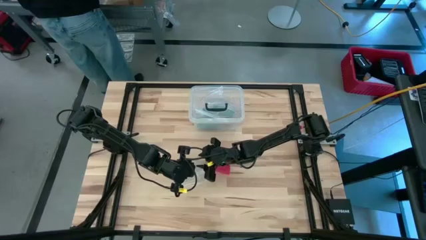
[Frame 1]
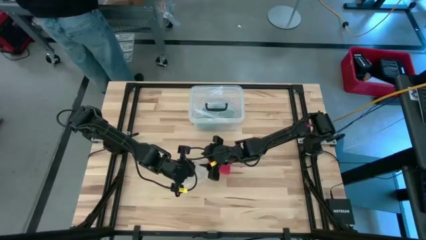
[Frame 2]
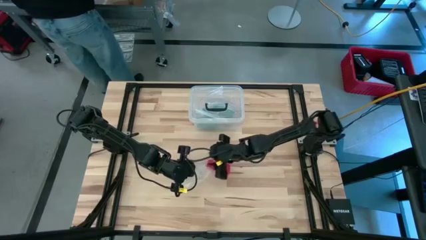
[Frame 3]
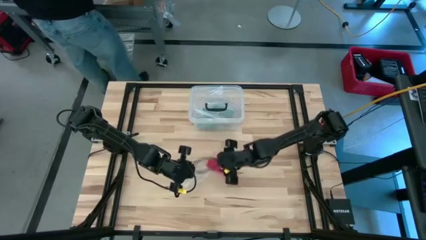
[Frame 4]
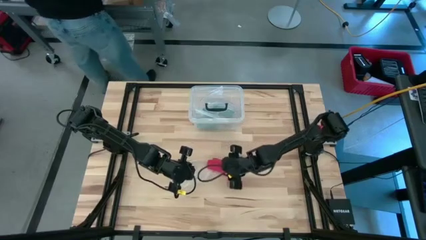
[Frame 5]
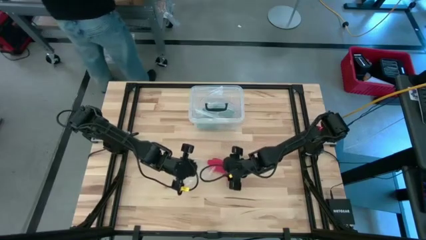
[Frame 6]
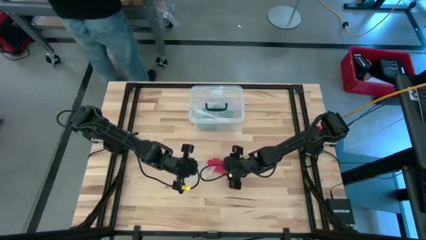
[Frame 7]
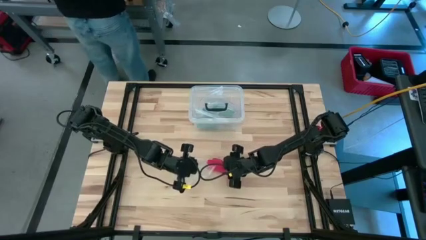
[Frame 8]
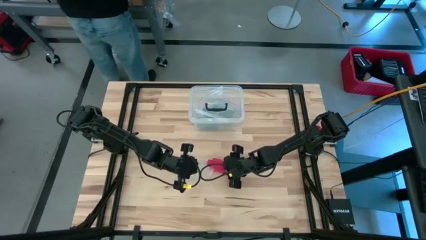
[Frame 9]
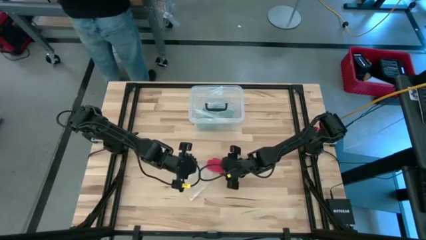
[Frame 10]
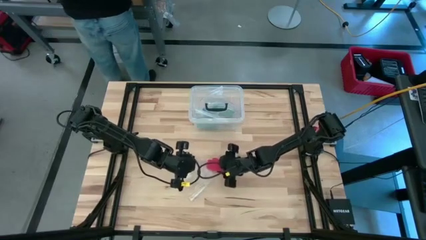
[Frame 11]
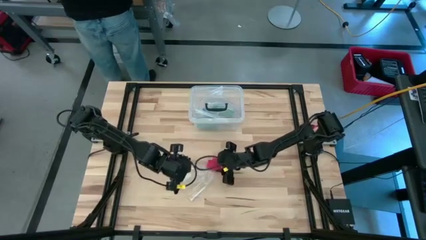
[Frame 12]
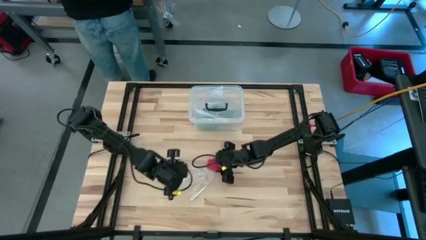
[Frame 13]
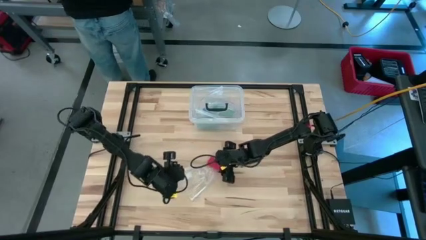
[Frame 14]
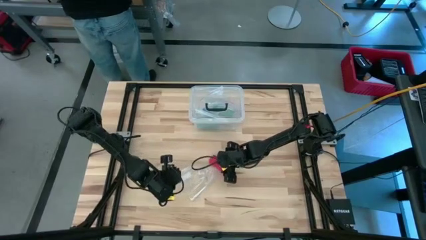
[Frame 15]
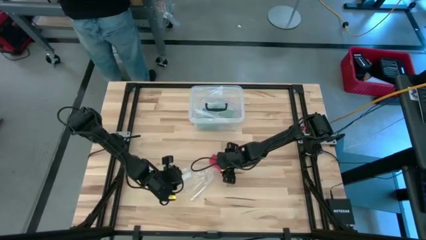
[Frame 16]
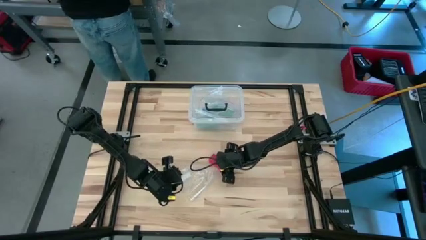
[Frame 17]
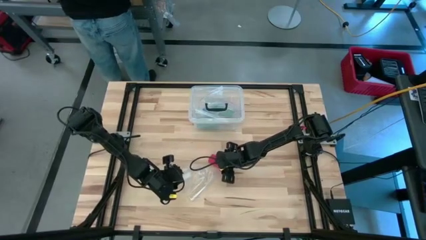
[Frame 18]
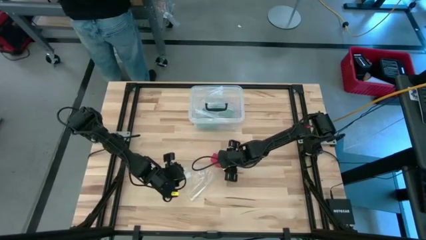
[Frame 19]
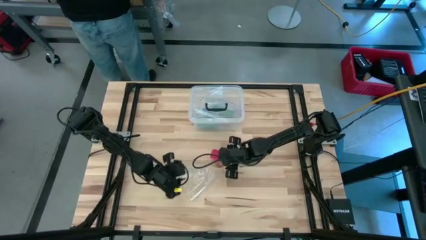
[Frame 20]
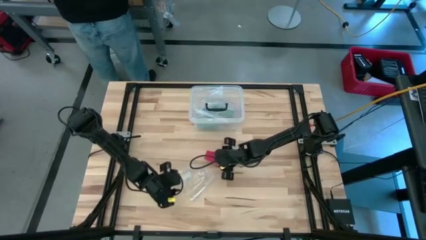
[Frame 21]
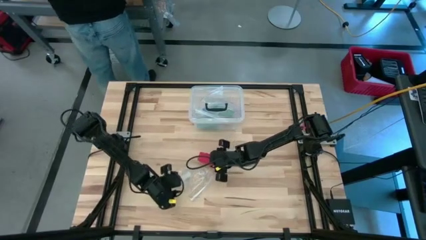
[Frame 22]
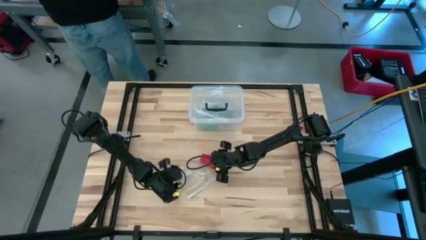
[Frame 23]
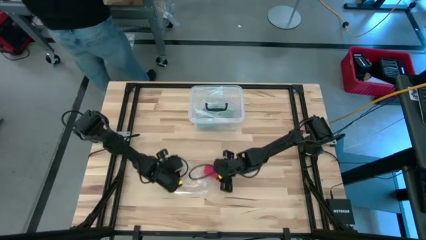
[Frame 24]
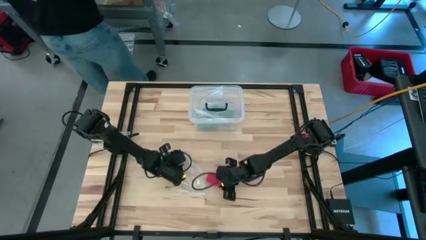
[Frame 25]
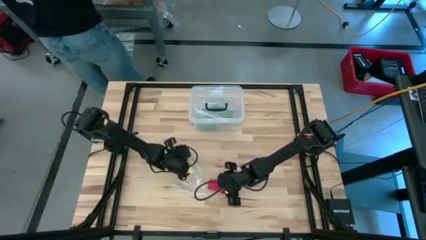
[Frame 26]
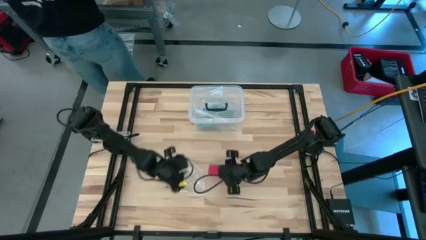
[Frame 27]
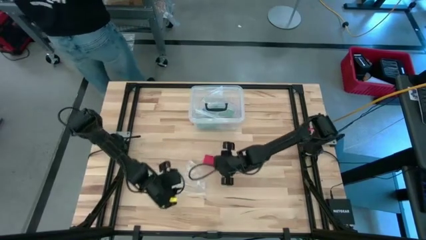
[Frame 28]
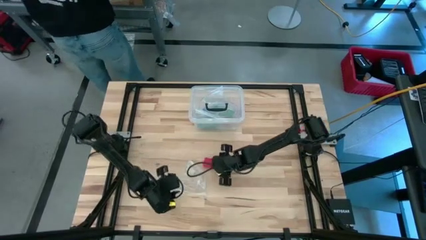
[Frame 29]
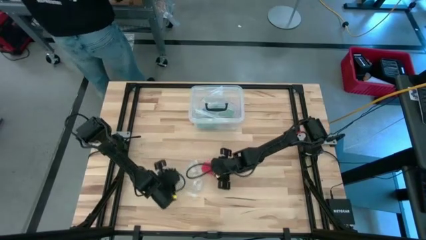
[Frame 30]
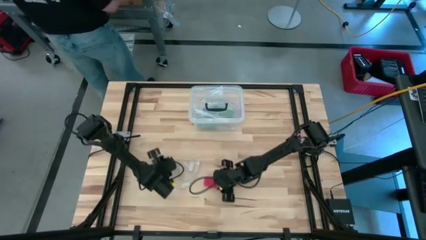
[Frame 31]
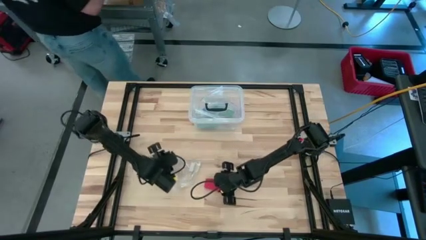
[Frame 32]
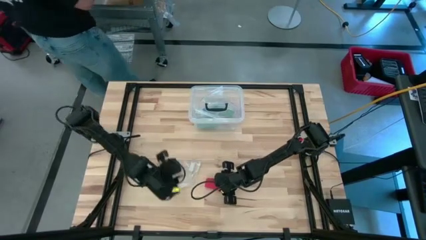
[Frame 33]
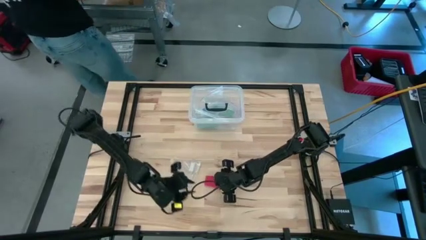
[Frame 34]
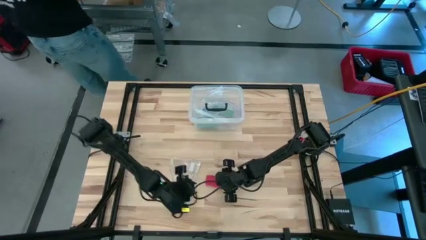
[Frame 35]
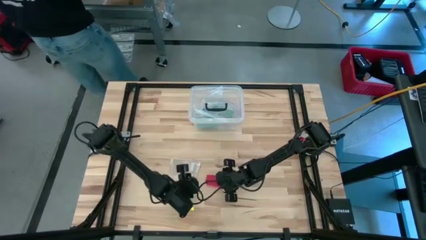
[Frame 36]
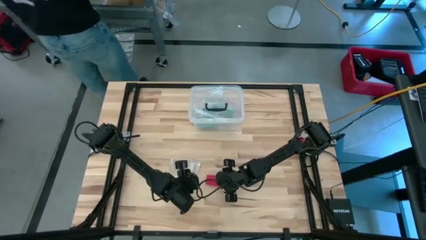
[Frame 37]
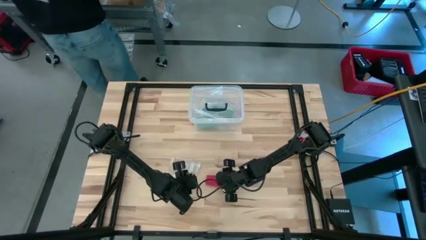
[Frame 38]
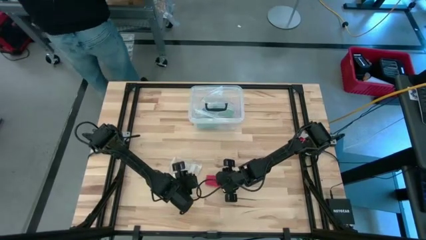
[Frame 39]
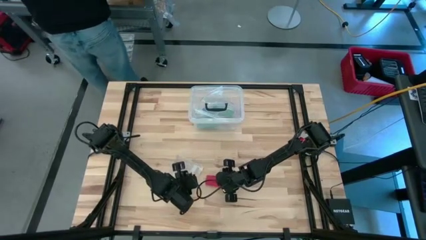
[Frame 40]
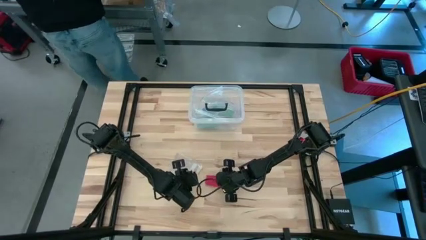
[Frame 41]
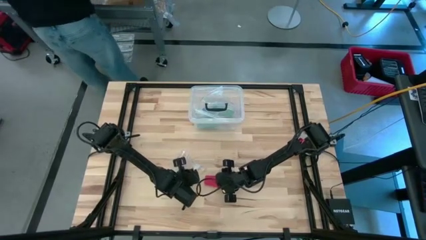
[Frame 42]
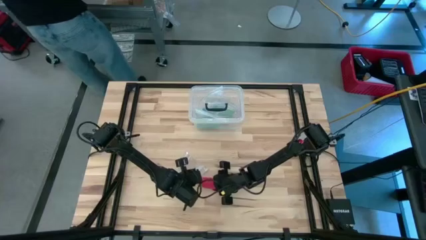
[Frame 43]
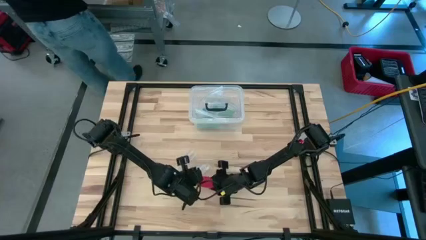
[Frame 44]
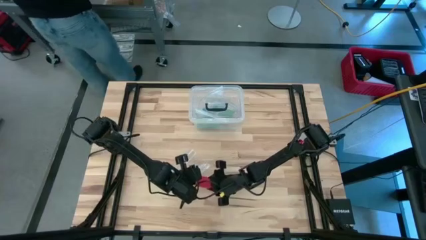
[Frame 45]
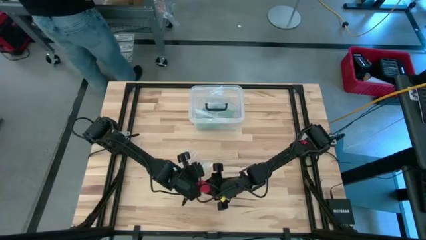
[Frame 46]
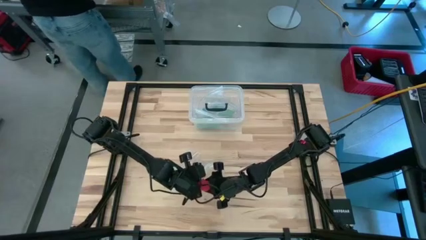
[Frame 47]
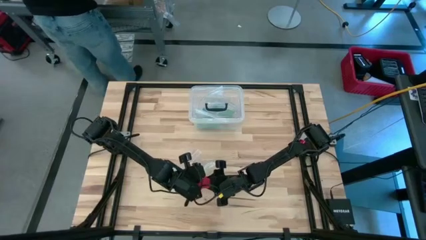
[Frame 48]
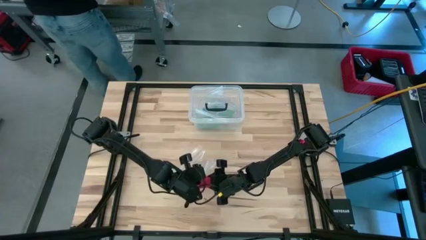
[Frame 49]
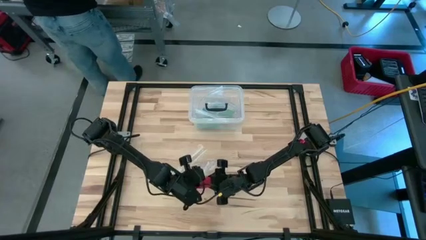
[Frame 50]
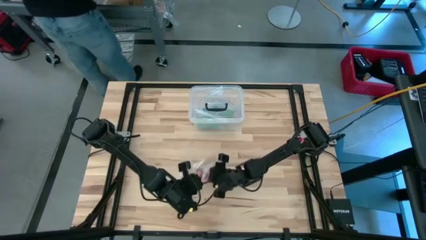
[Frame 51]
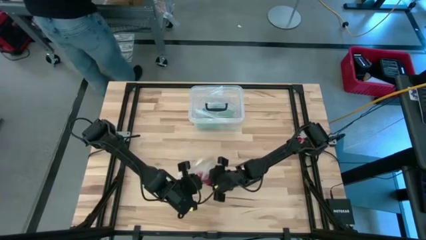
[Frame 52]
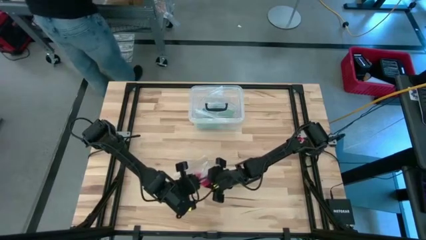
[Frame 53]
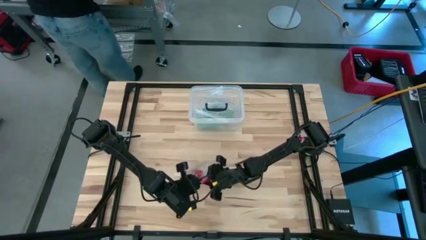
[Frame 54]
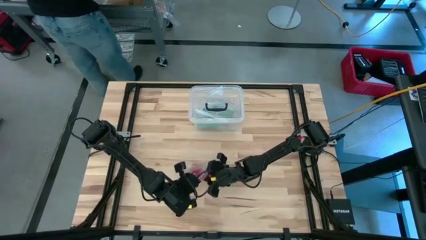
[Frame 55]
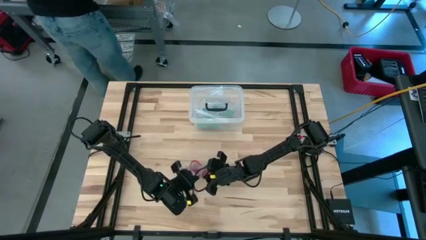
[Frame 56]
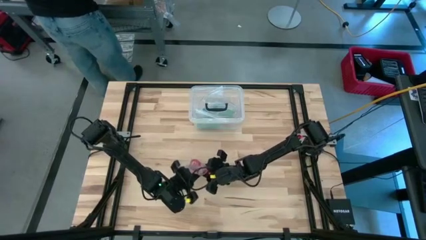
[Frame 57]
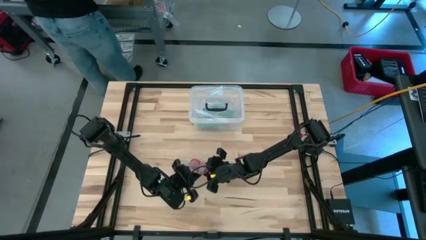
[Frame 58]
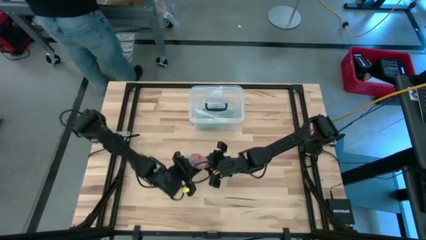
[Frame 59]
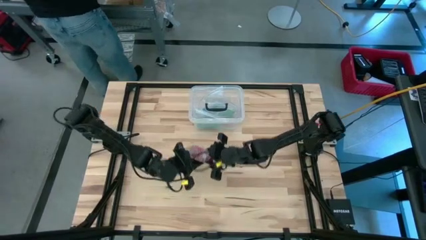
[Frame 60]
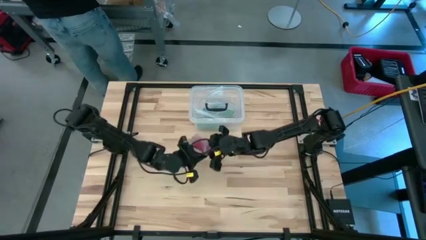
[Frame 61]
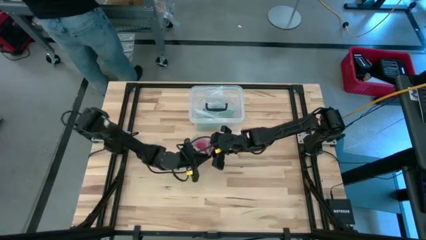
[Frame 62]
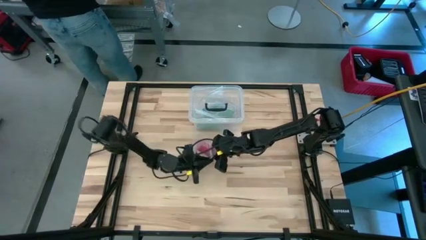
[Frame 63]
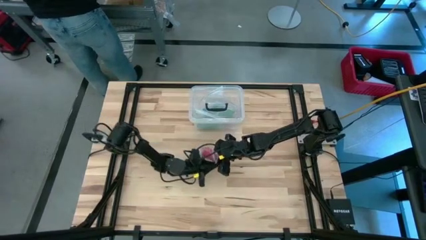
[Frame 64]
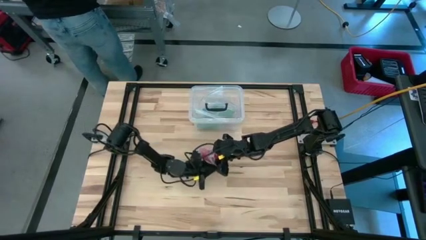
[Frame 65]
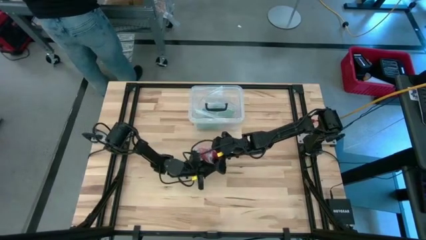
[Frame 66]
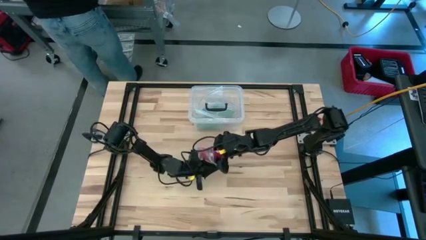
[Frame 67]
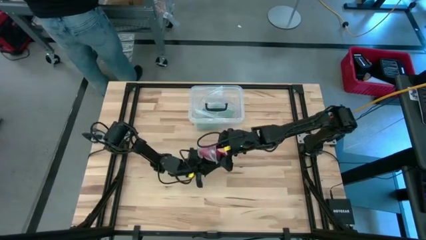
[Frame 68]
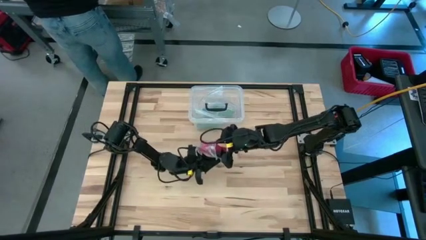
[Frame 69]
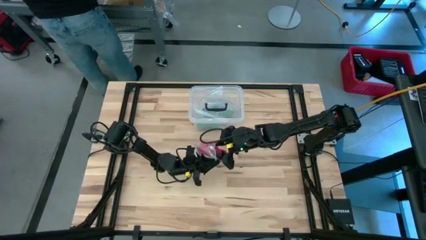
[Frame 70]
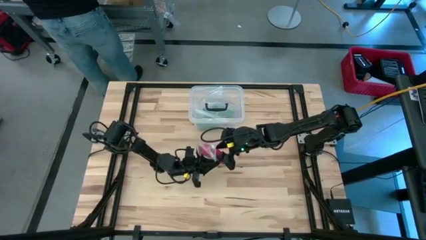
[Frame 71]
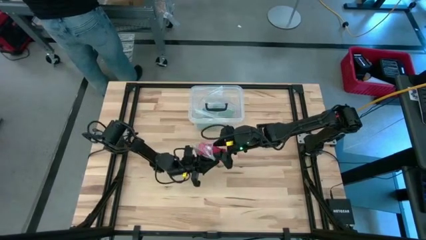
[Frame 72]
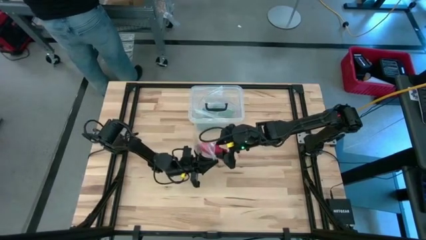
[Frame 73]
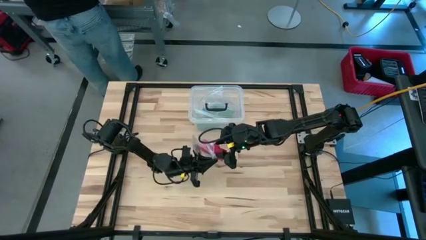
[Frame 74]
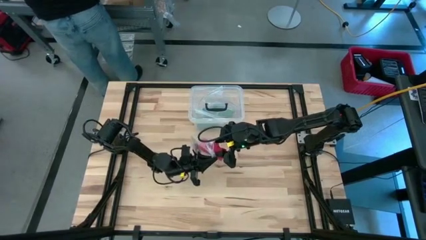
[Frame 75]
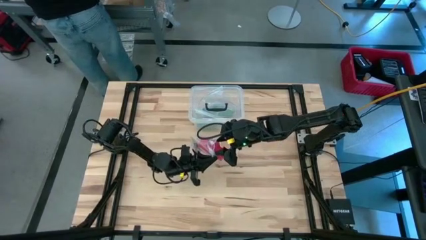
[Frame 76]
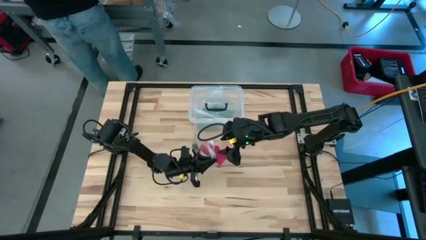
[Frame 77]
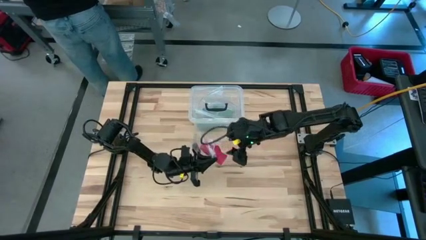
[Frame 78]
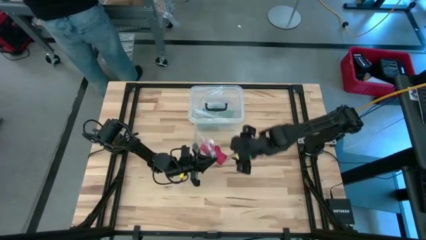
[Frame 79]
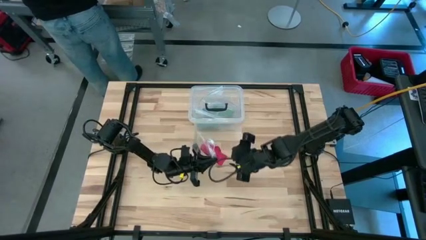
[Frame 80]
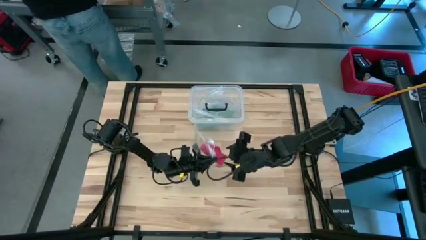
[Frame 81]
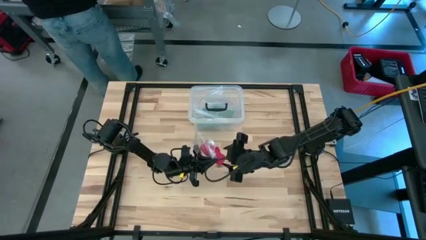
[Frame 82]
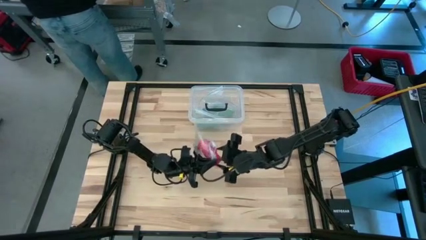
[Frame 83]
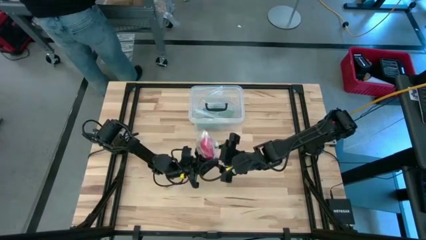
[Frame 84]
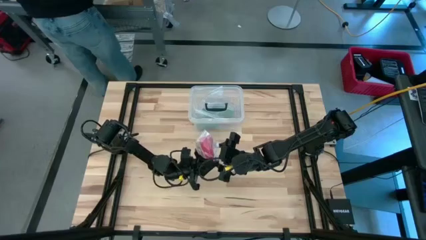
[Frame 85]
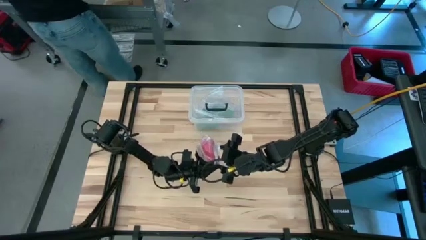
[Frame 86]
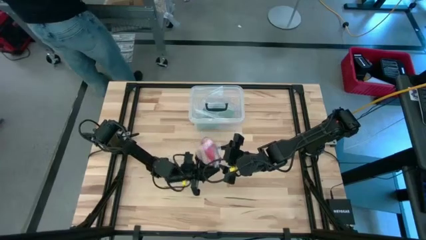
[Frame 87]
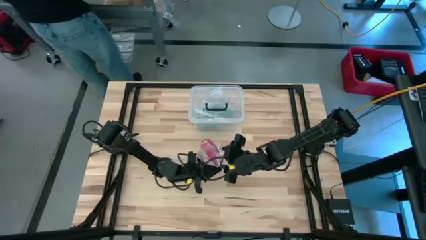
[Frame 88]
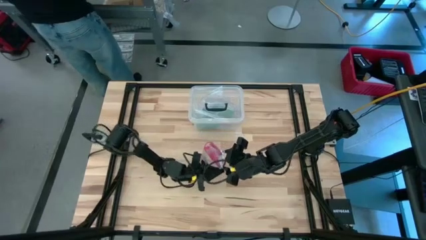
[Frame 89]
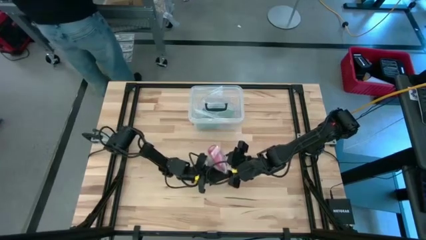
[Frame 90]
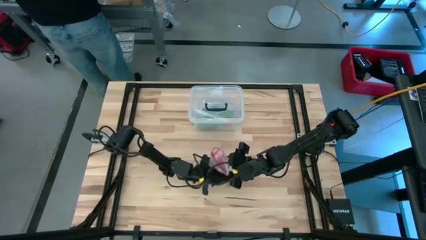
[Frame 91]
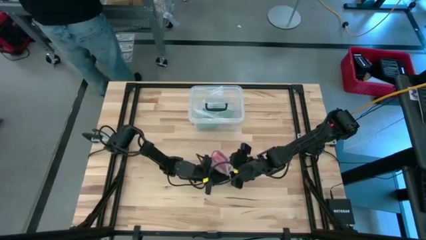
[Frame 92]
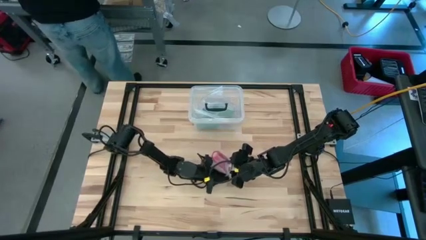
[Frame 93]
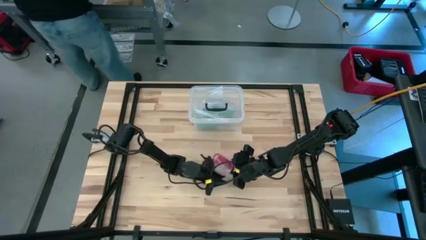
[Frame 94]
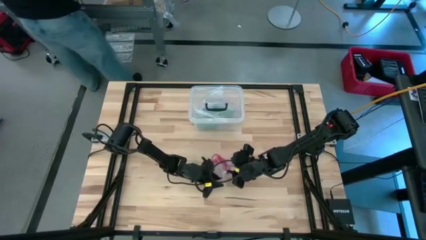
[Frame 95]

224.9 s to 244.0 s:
Task: Roll bandage
Put the red bandage into the transparent zip bag
